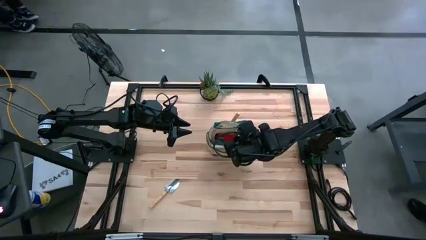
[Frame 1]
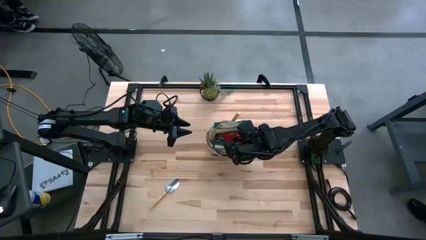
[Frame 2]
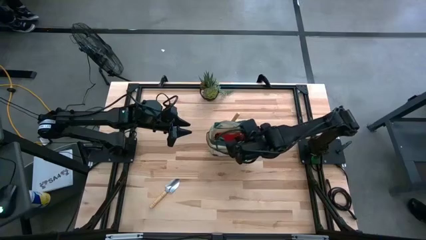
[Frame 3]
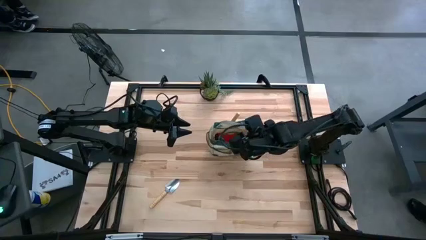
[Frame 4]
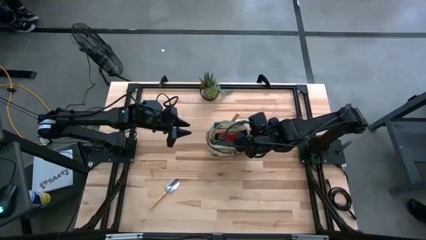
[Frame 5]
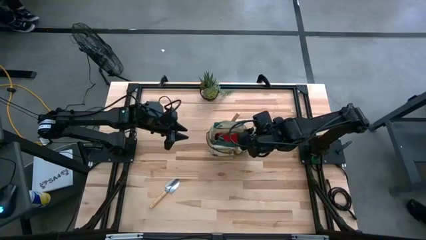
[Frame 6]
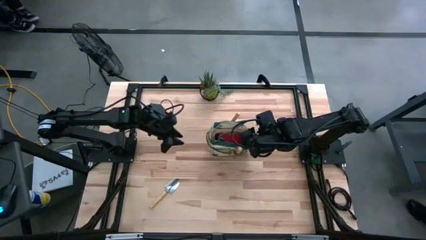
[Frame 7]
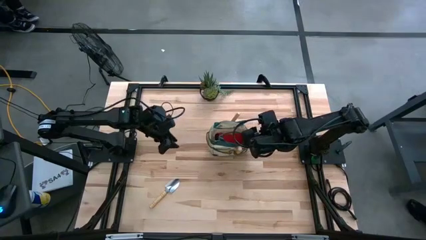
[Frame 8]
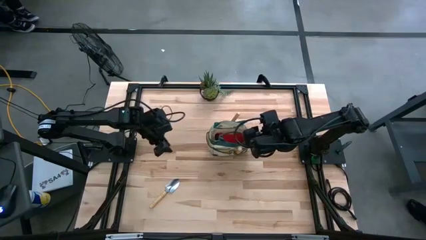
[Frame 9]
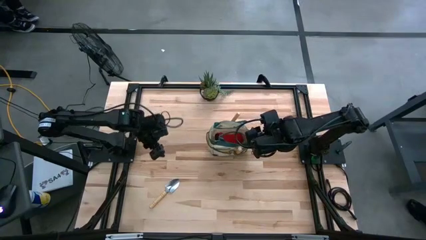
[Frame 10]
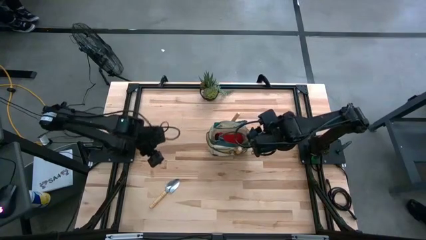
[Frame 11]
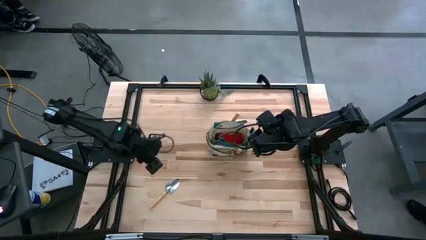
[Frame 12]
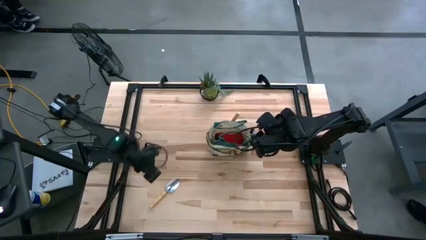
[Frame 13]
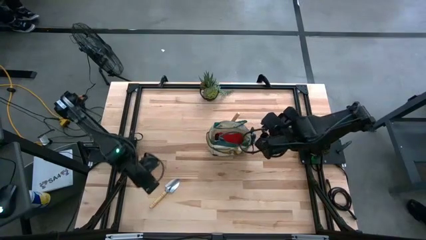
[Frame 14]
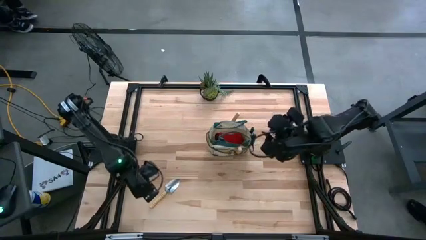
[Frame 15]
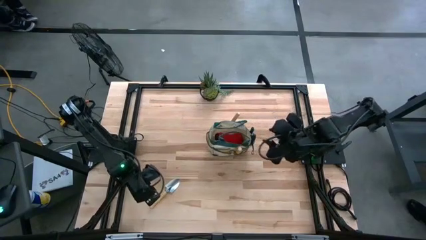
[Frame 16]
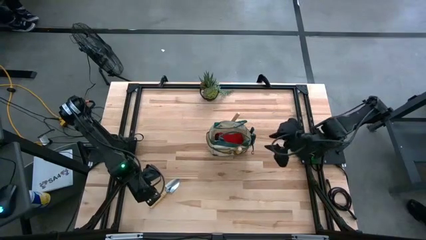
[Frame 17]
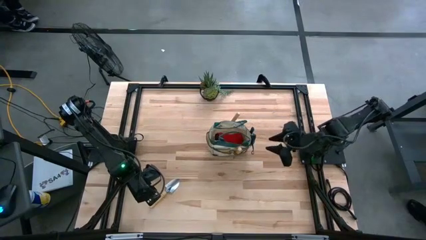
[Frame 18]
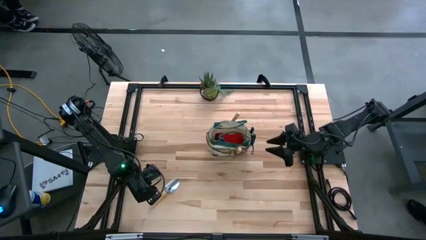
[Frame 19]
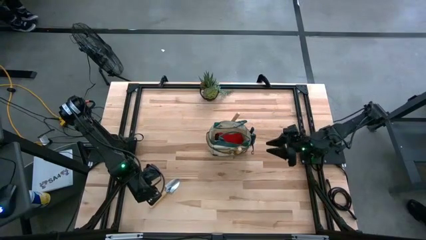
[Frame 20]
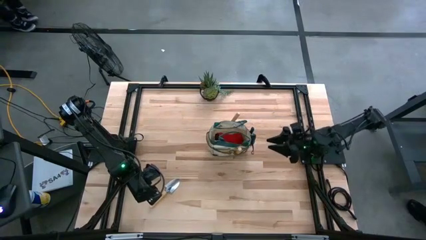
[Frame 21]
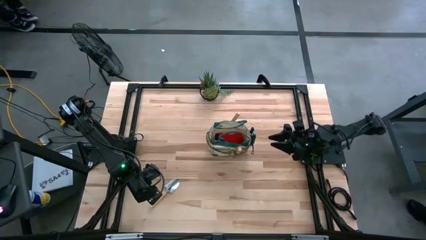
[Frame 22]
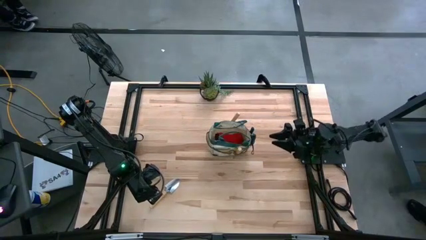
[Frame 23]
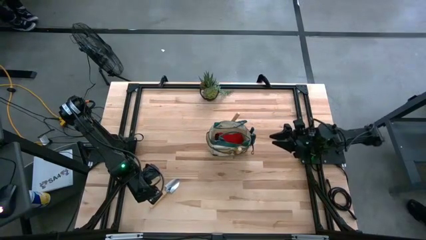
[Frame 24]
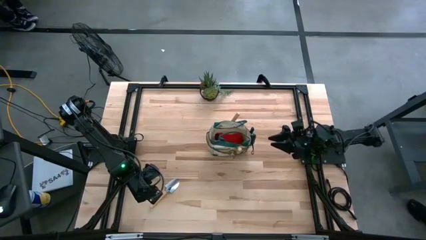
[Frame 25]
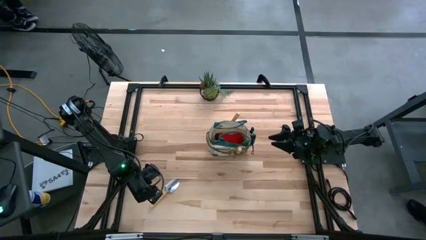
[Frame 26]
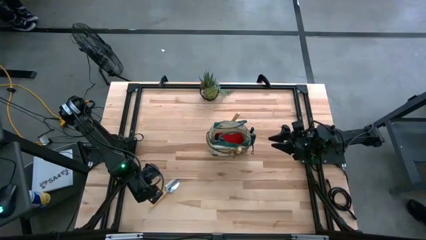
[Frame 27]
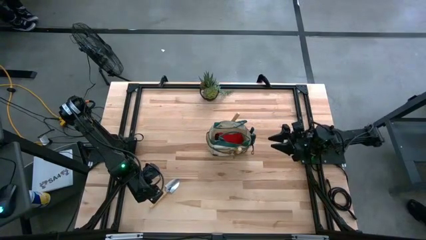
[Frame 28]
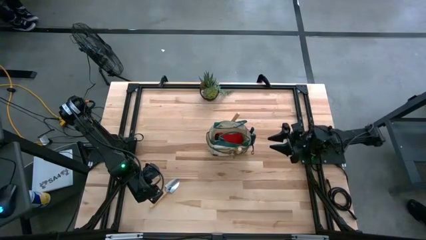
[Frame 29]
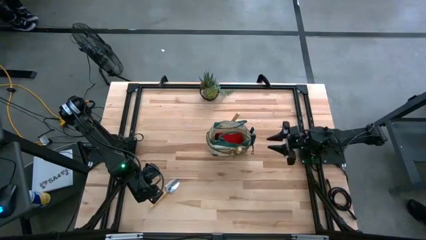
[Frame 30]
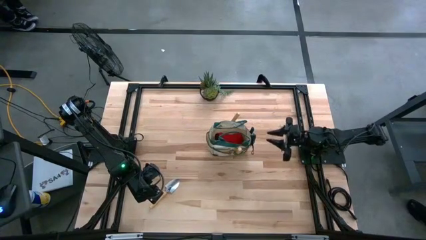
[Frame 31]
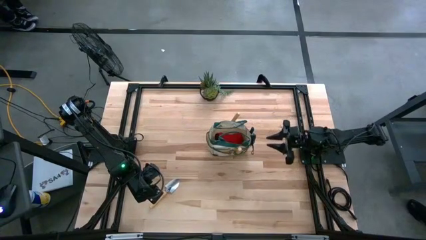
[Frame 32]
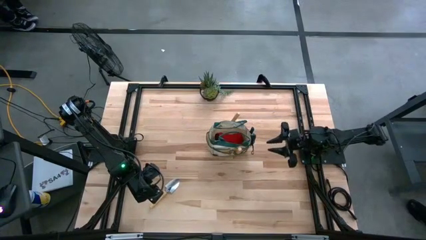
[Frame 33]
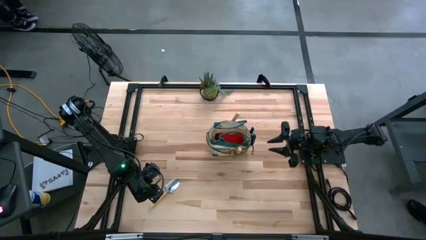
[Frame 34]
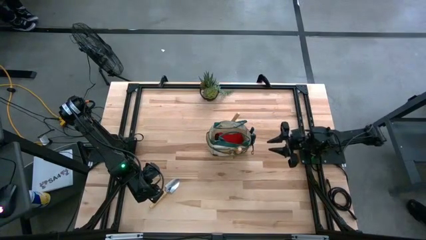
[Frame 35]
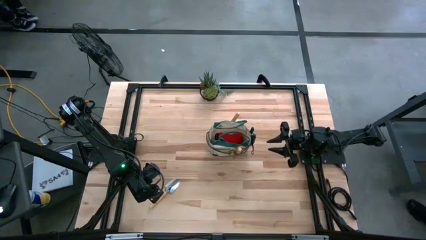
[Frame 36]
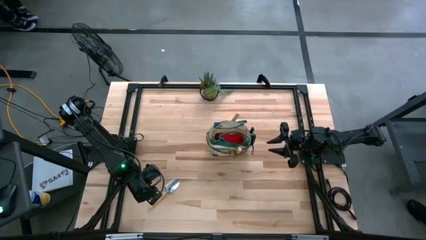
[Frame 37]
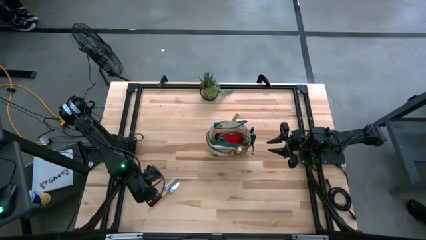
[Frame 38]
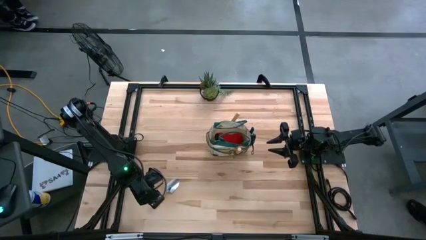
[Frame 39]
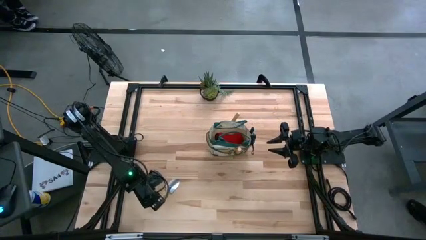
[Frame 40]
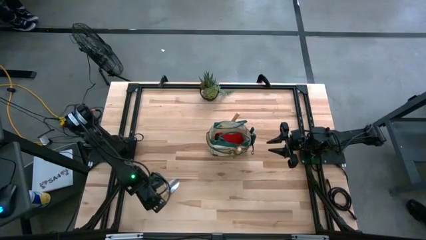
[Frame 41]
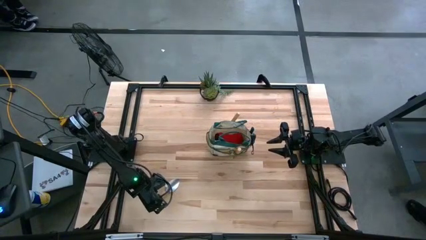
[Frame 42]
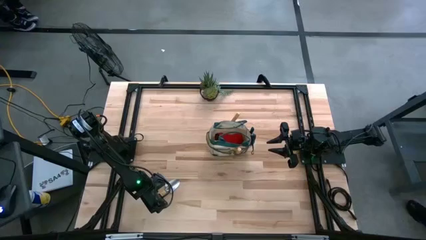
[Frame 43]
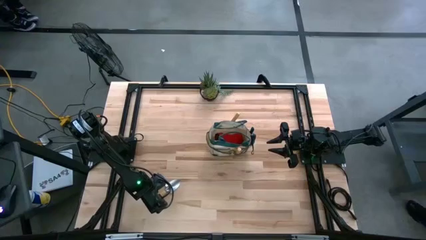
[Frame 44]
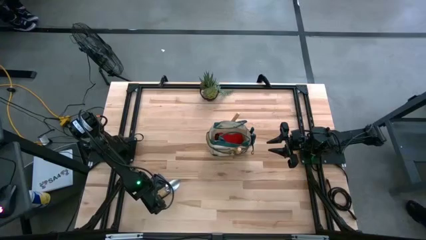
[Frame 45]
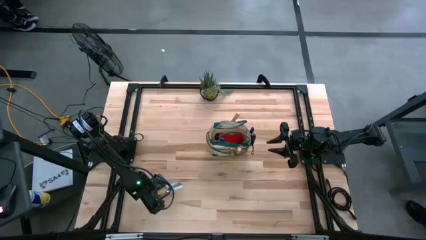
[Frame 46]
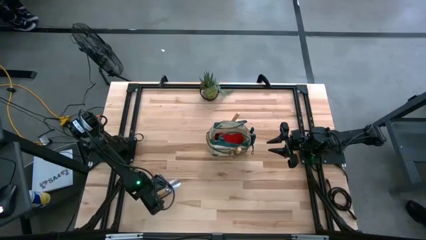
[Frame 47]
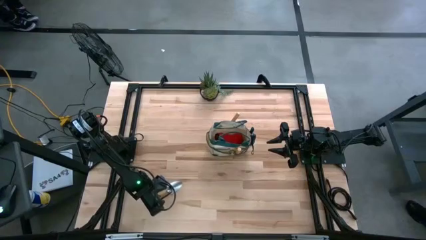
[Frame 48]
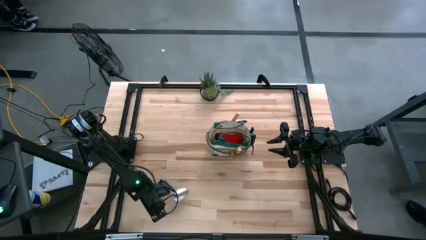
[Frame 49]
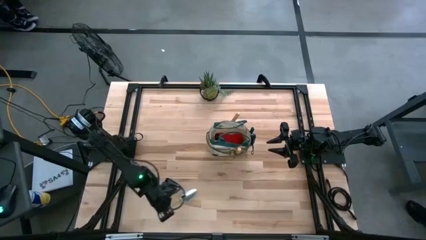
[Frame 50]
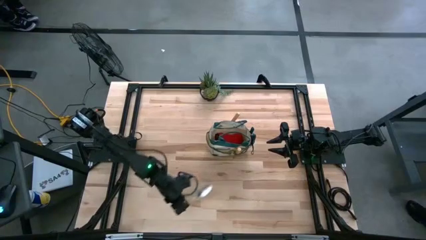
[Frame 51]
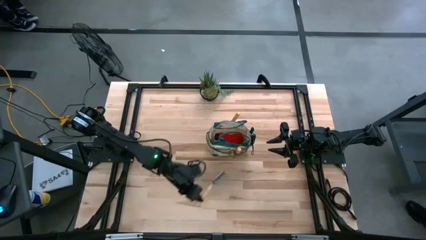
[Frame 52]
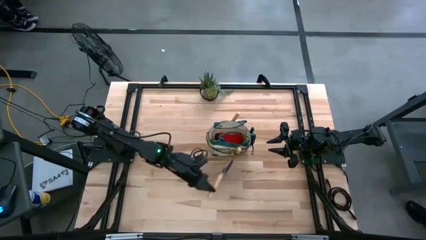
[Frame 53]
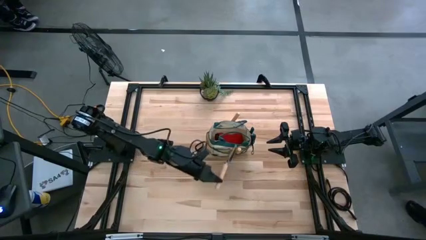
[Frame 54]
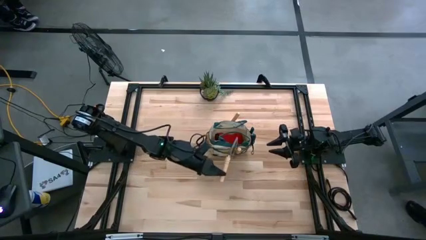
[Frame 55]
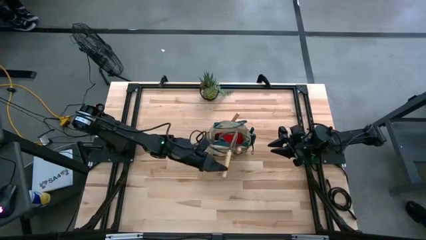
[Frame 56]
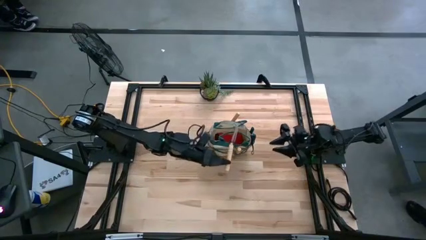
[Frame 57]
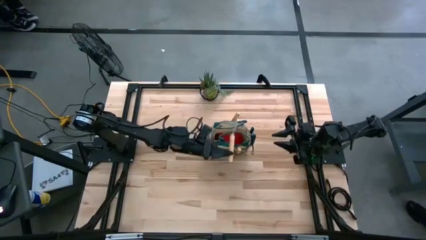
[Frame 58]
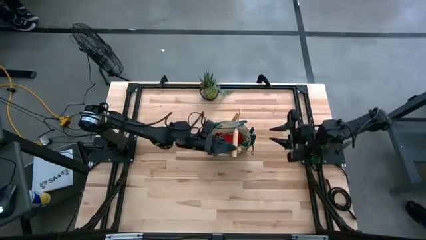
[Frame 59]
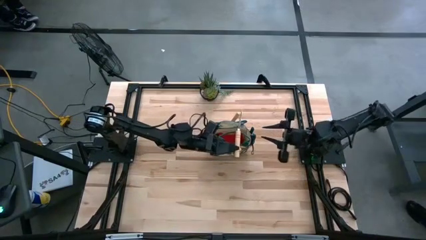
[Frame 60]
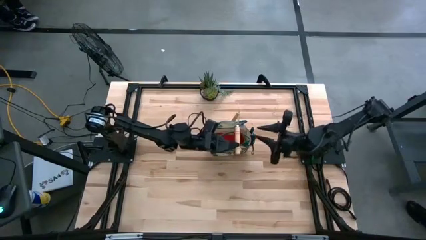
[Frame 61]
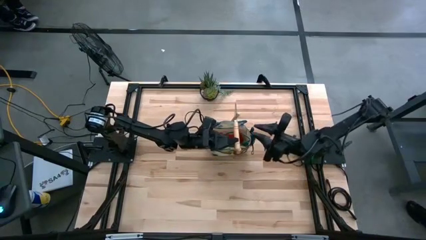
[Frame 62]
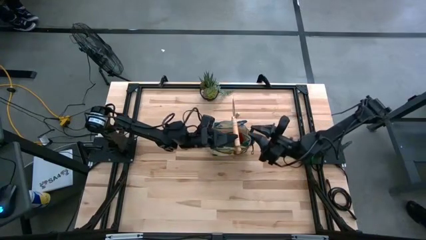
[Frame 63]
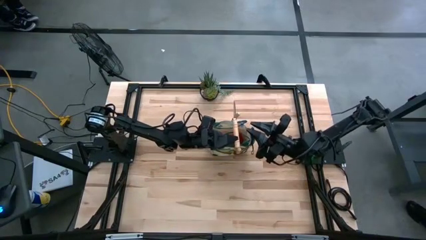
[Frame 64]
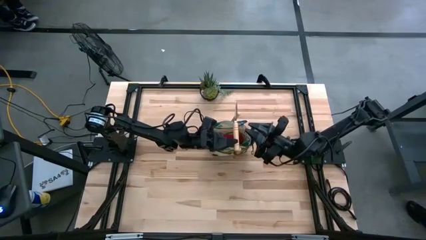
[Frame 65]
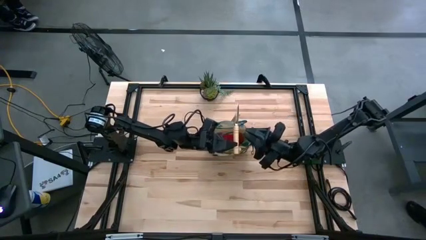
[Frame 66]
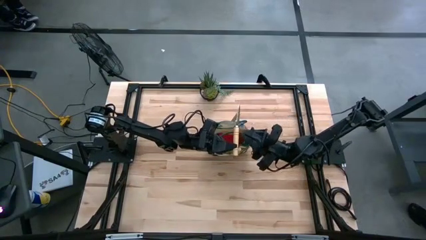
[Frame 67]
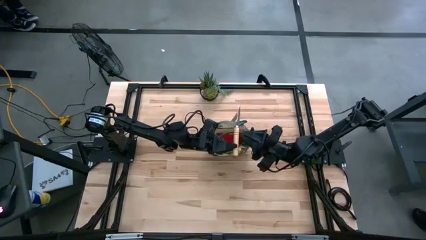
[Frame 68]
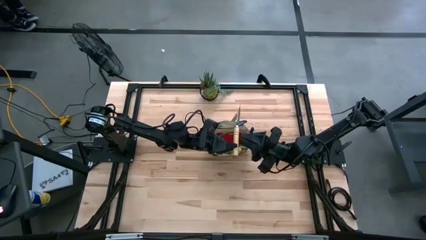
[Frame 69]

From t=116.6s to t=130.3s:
Task: Pick & Place Garden tools in Gardening bag
Put the light brown trowel into the light brown gardening bag
